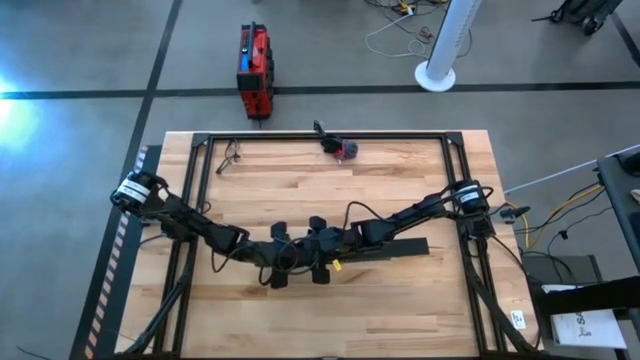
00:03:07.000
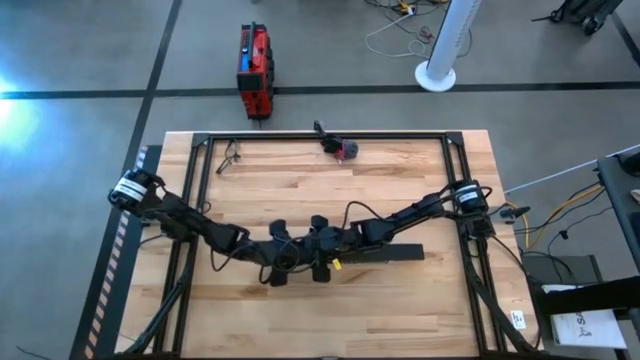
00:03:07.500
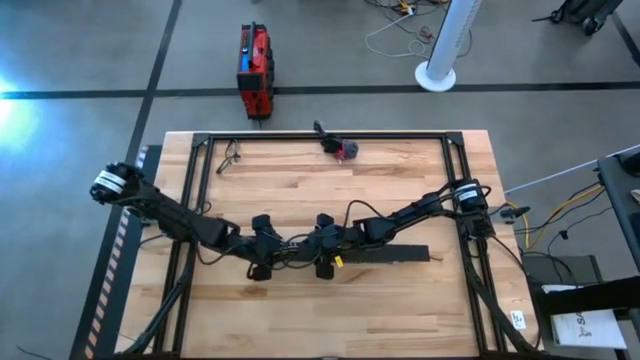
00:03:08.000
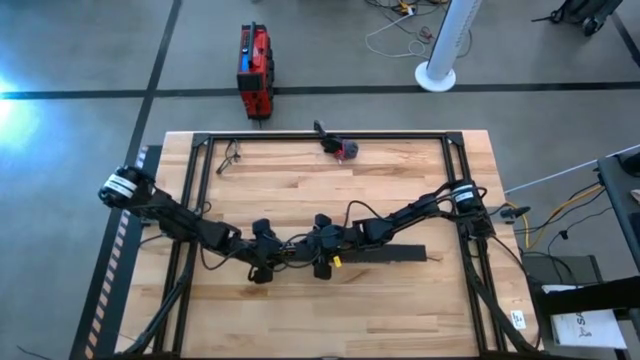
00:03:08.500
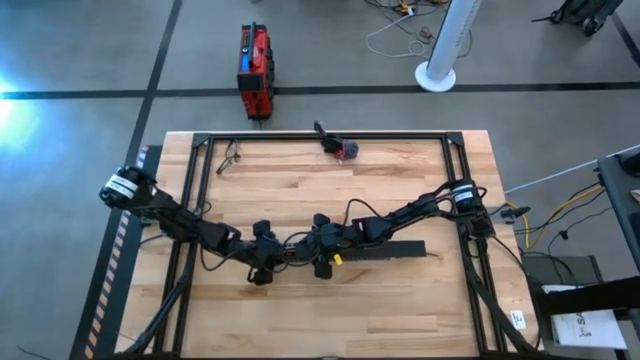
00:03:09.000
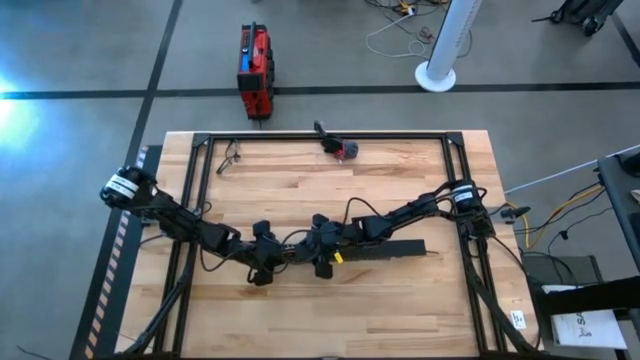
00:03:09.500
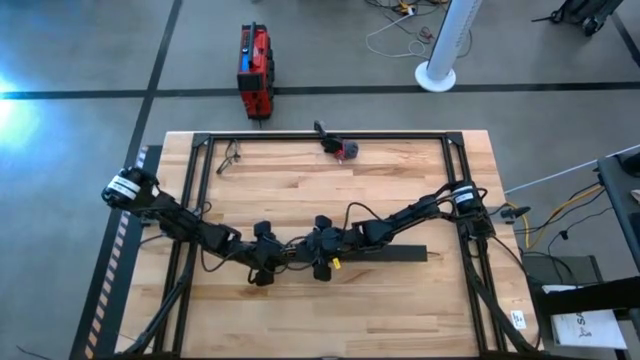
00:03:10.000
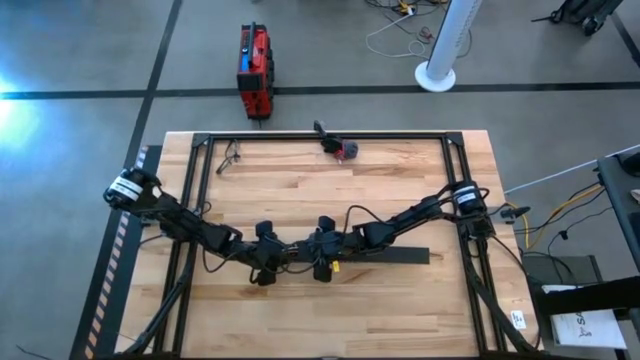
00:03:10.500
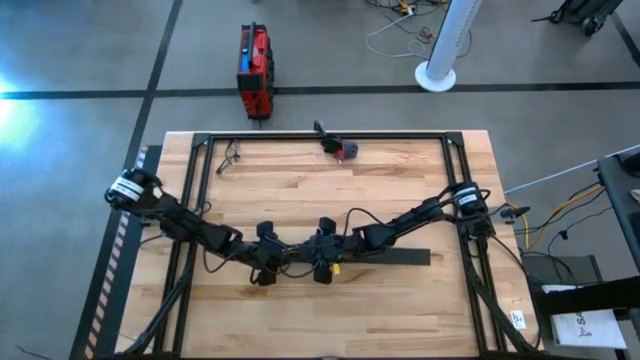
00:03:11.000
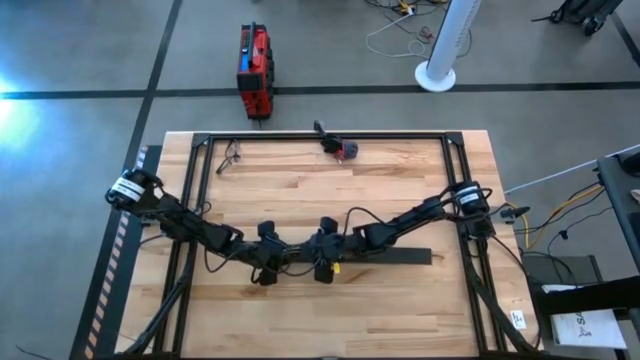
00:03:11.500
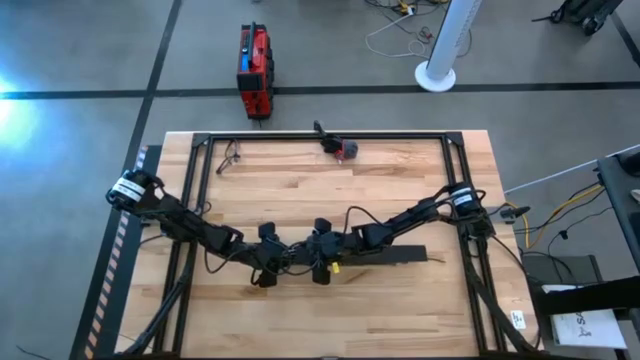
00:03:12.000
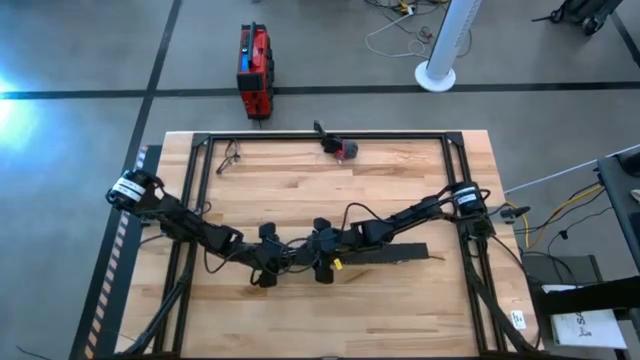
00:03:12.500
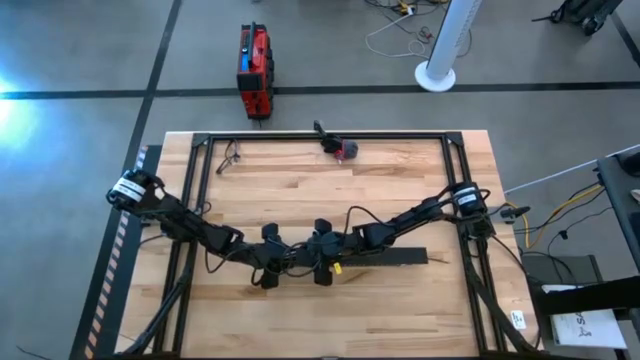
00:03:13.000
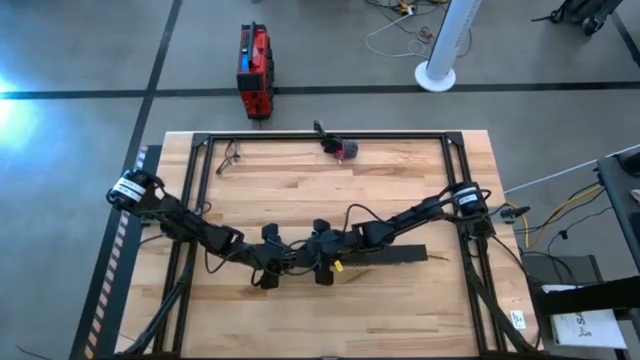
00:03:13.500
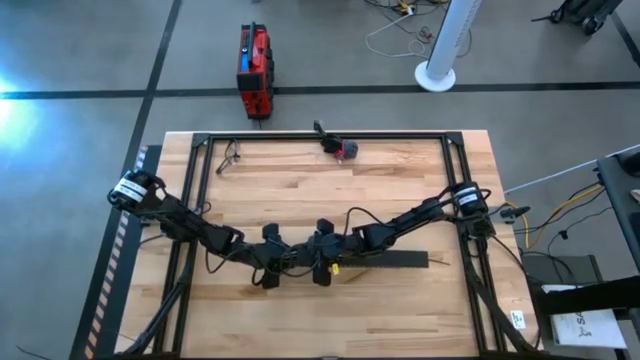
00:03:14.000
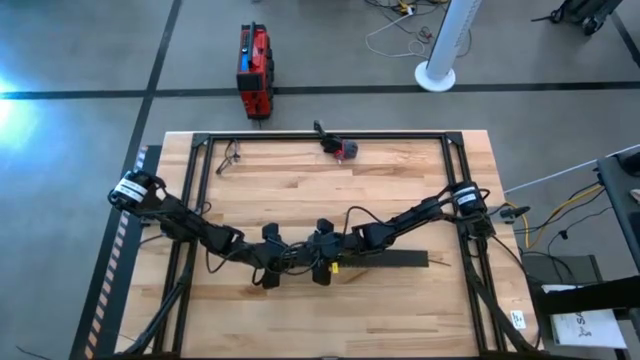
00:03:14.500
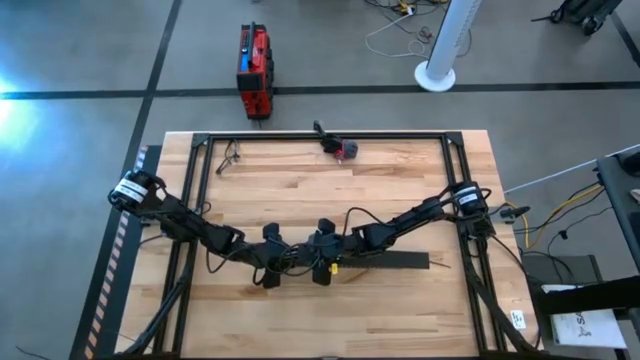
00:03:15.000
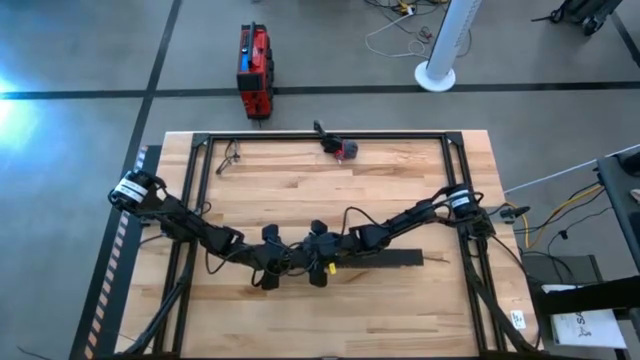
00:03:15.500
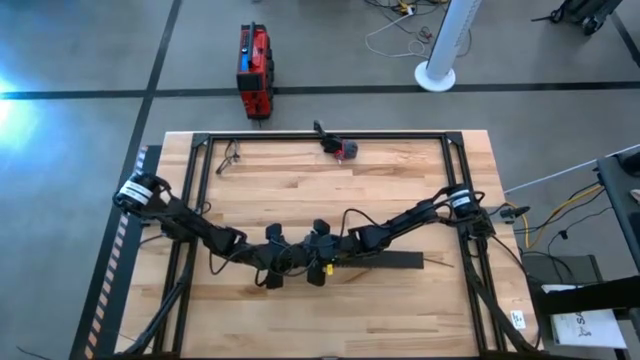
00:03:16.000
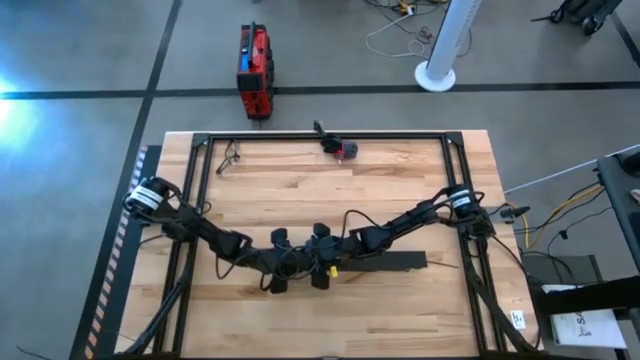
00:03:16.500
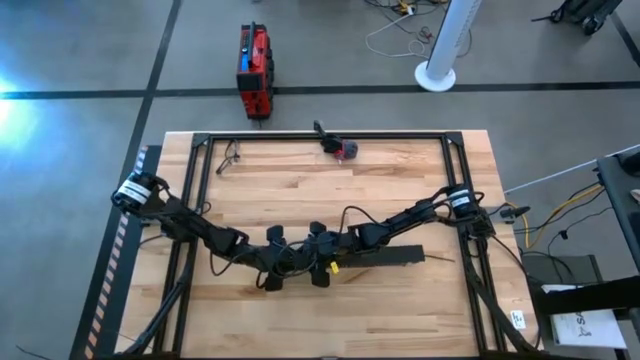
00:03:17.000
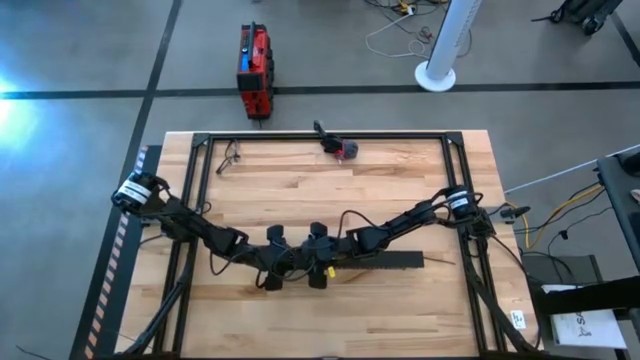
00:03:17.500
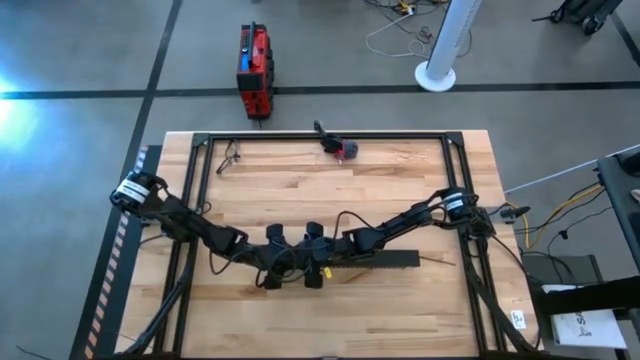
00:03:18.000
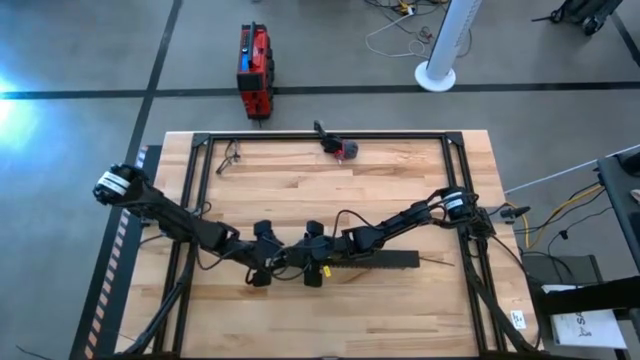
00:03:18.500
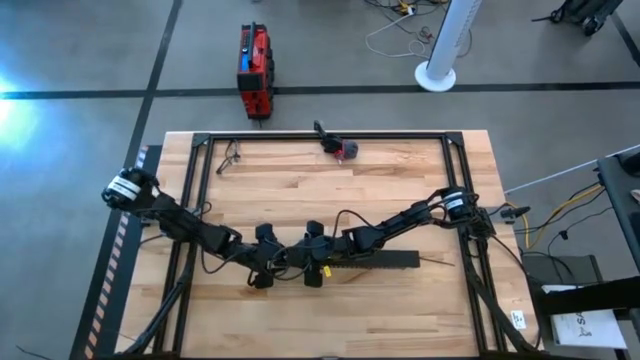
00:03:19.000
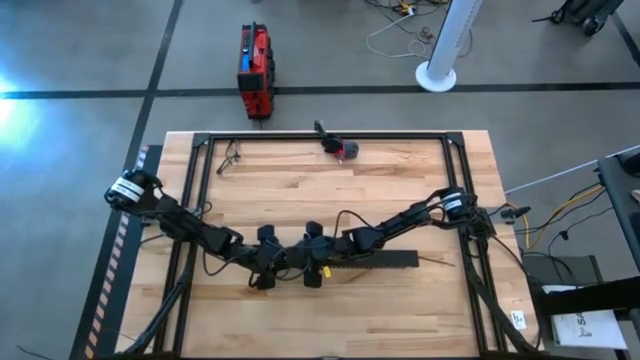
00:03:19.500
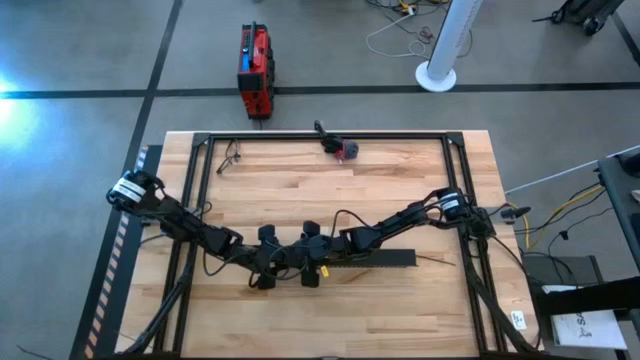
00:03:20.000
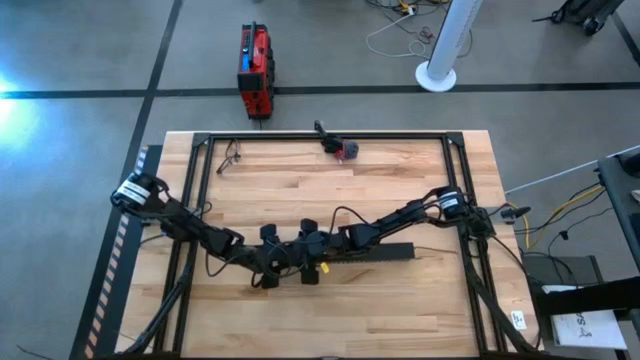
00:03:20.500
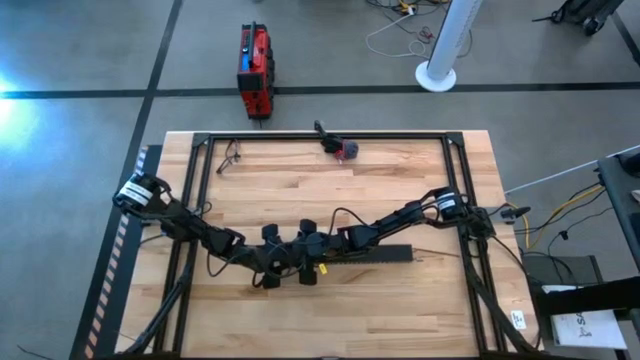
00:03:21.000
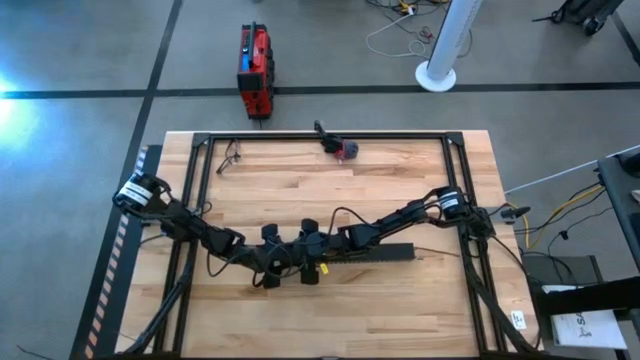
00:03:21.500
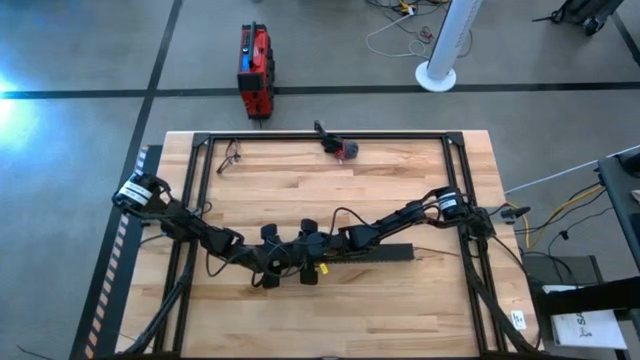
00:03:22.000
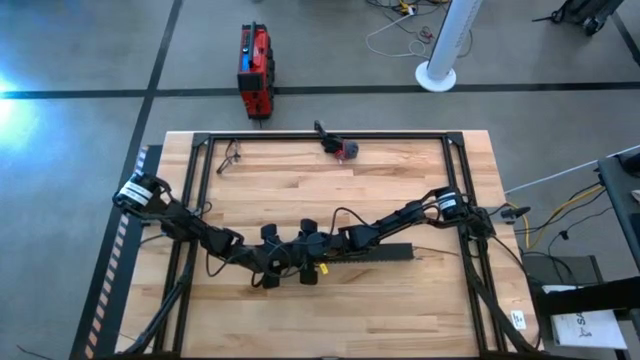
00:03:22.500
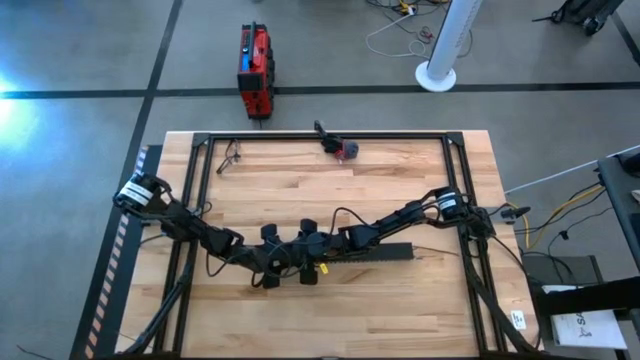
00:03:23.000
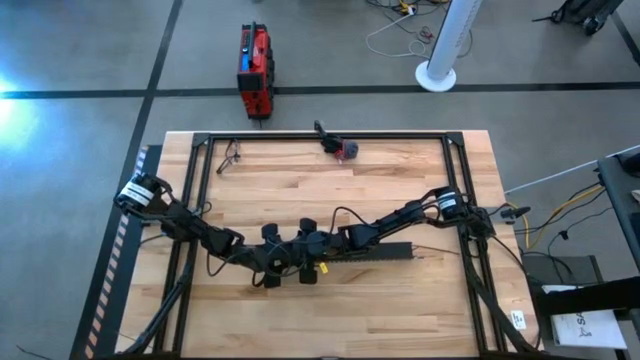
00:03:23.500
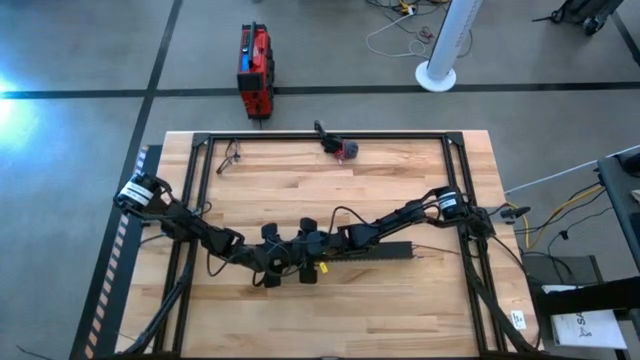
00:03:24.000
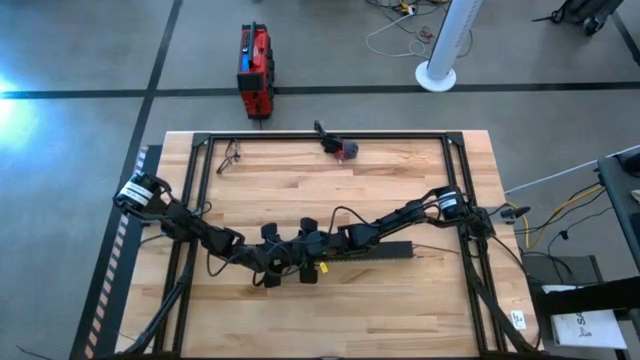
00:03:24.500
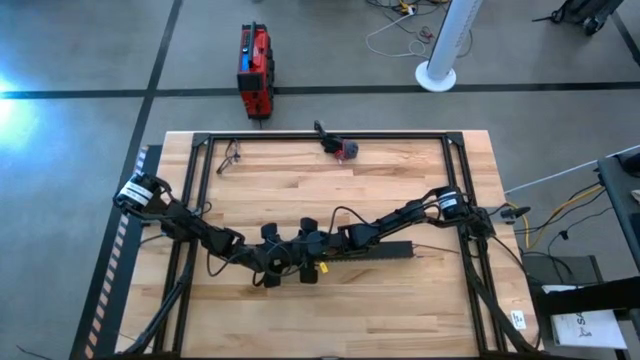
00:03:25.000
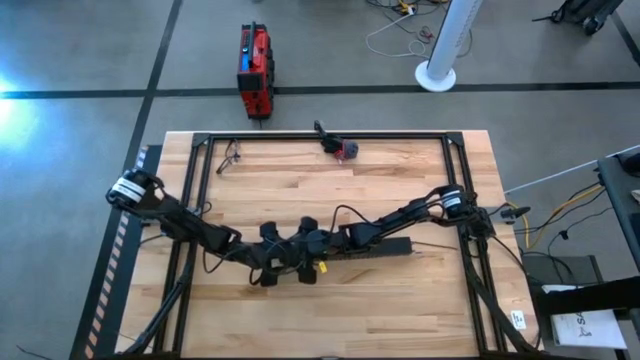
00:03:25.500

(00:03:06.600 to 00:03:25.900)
Task: Ziptie cables
Close the black cable duct

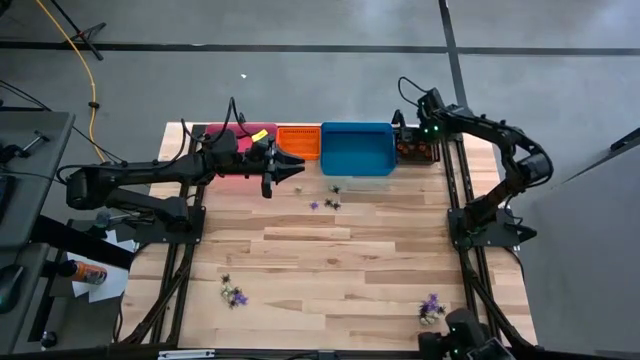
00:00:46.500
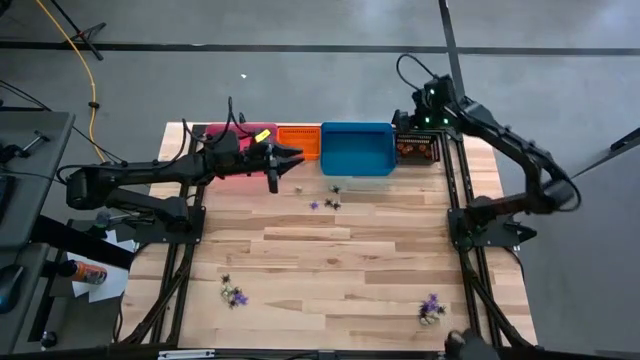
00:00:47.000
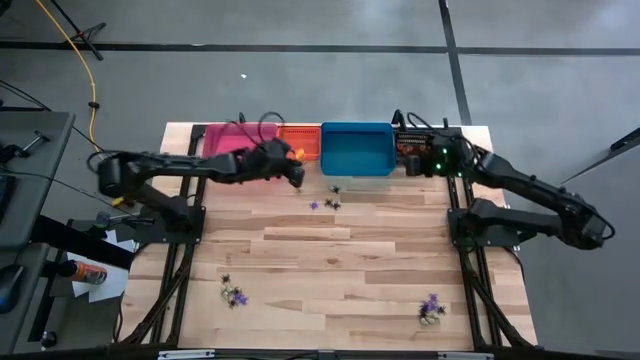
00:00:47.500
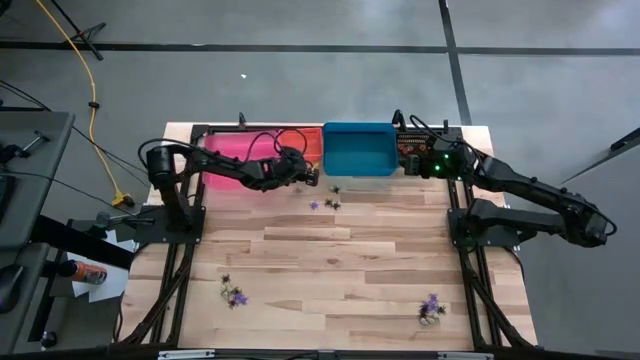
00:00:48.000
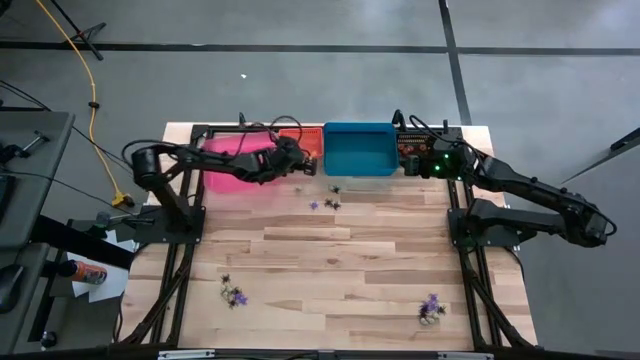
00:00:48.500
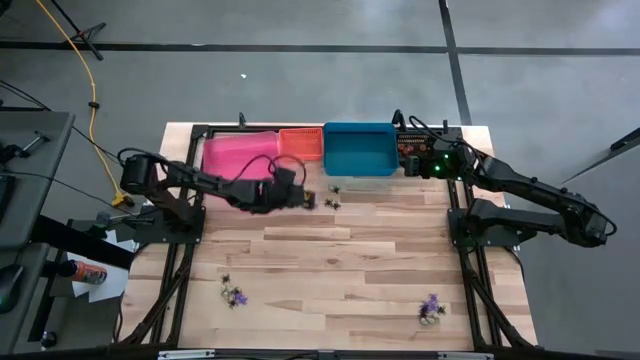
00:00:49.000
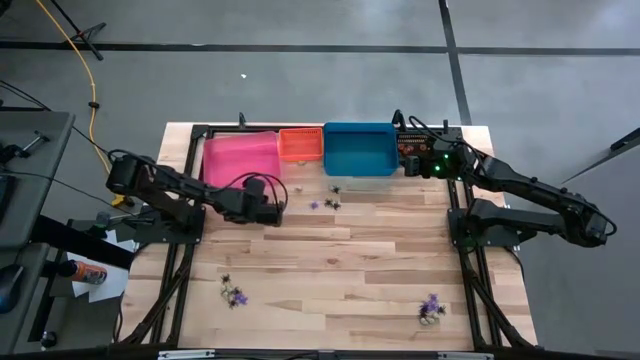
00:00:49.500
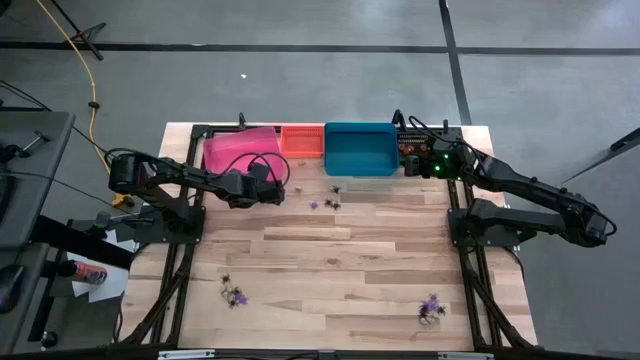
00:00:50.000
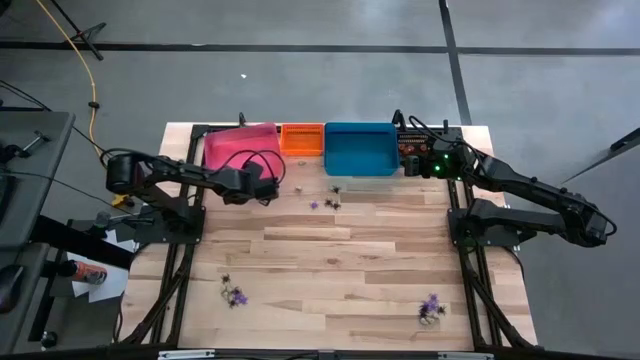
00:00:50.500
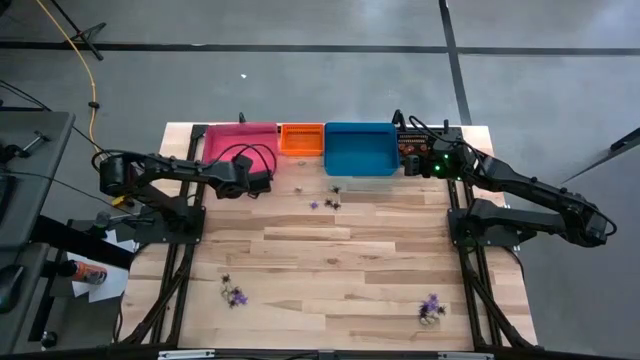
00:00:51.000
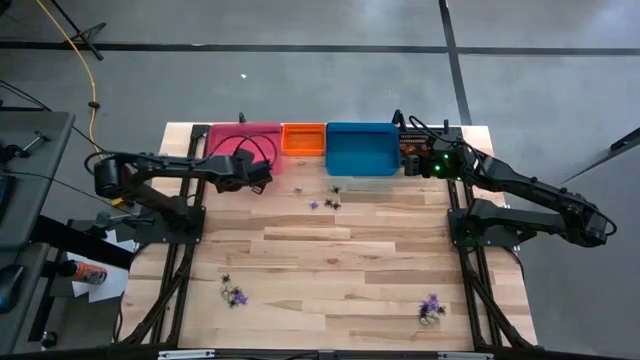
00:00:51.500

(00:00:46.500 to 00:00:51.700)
Task: Sort Halloween decoration
Adjust the pink bin
